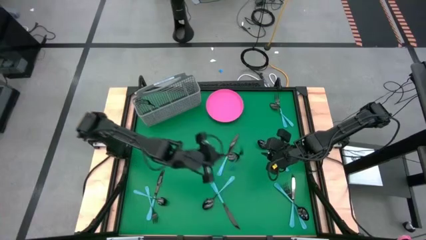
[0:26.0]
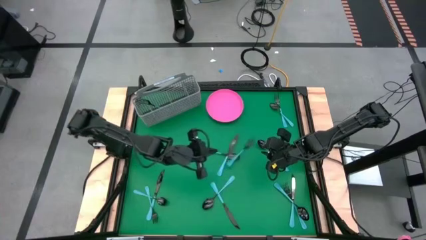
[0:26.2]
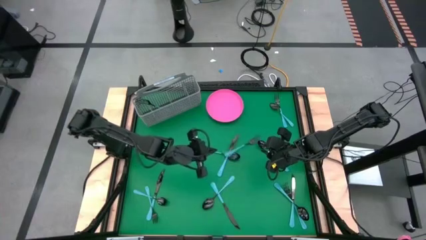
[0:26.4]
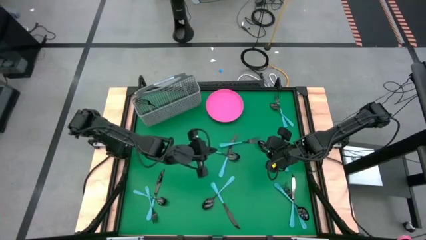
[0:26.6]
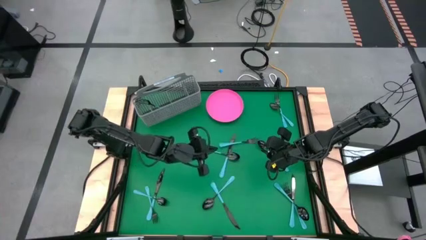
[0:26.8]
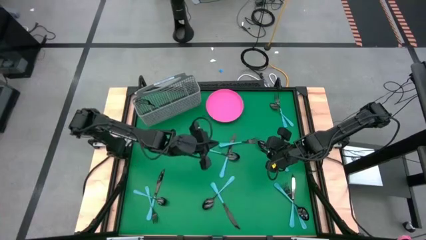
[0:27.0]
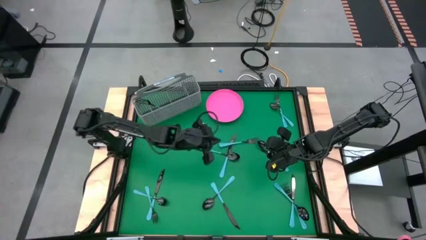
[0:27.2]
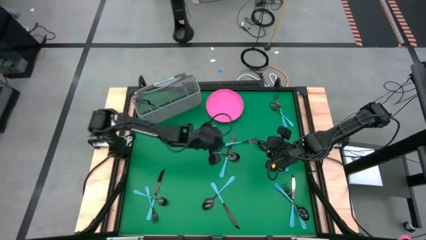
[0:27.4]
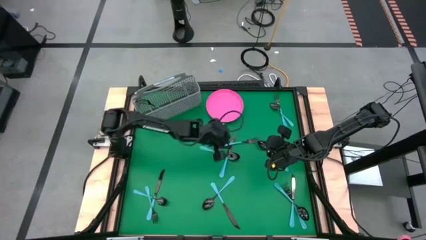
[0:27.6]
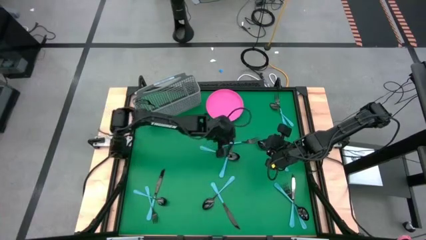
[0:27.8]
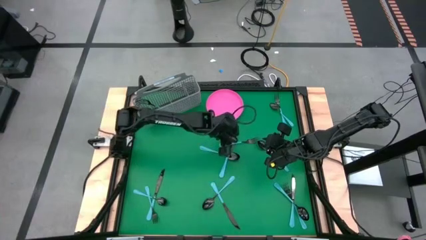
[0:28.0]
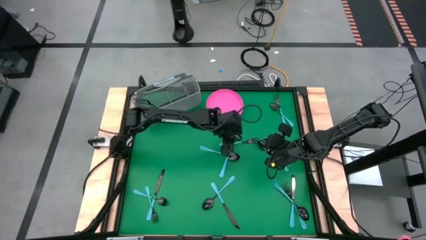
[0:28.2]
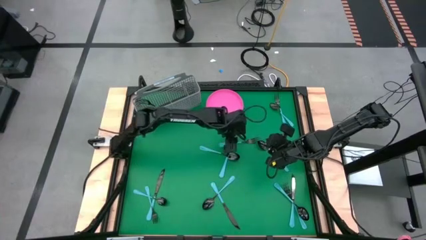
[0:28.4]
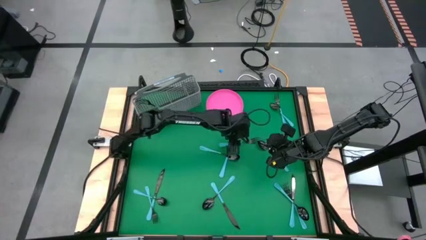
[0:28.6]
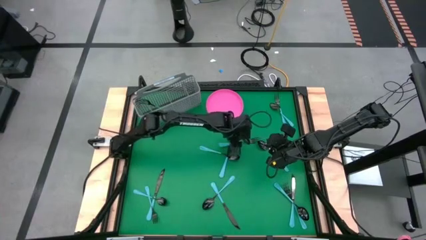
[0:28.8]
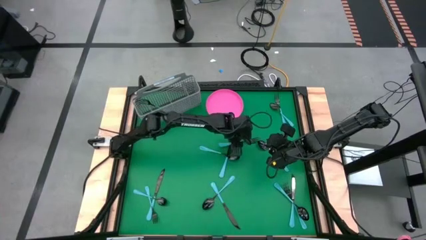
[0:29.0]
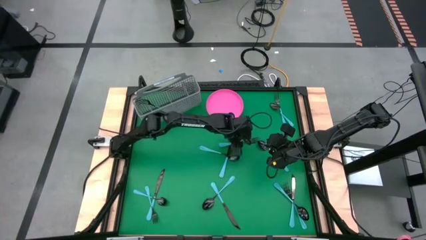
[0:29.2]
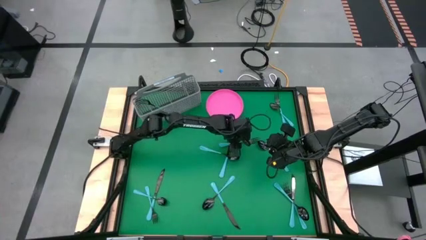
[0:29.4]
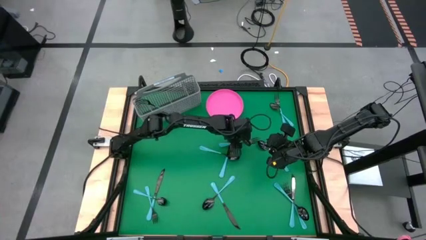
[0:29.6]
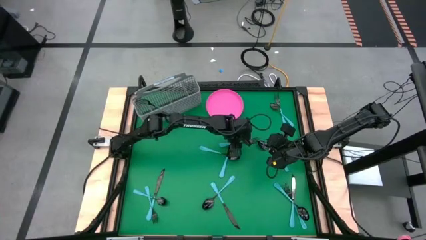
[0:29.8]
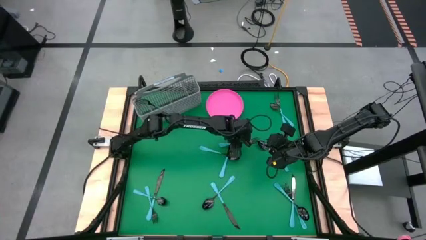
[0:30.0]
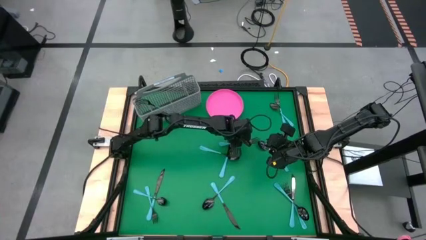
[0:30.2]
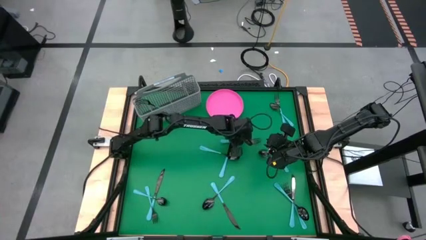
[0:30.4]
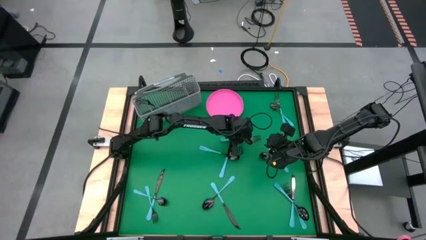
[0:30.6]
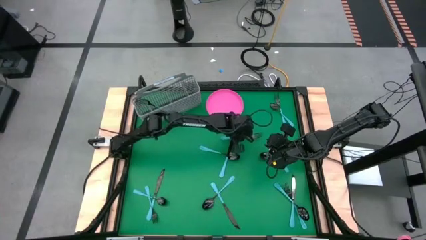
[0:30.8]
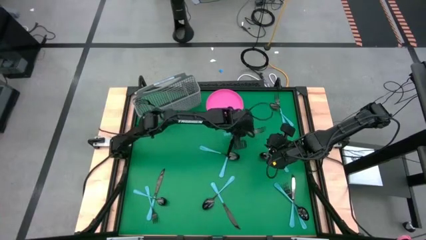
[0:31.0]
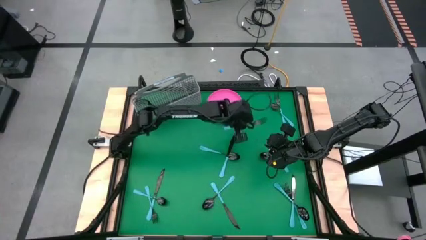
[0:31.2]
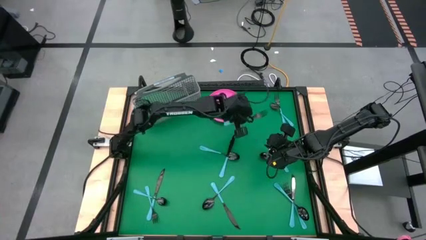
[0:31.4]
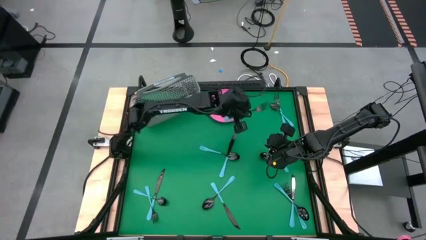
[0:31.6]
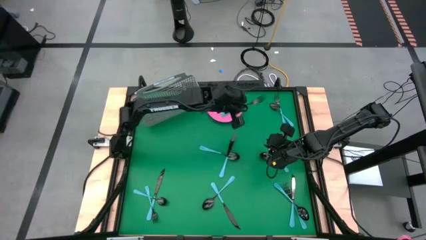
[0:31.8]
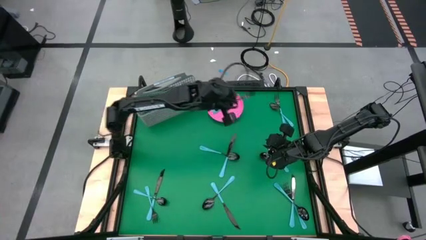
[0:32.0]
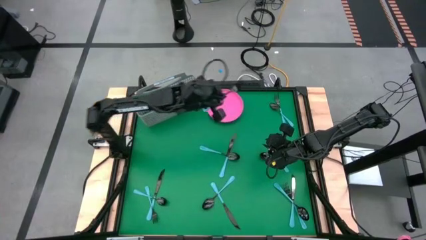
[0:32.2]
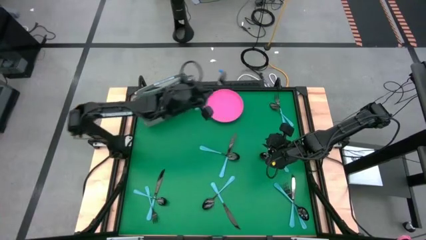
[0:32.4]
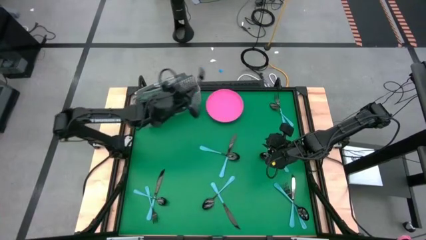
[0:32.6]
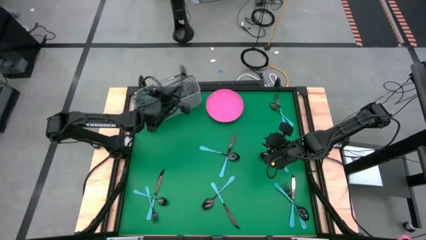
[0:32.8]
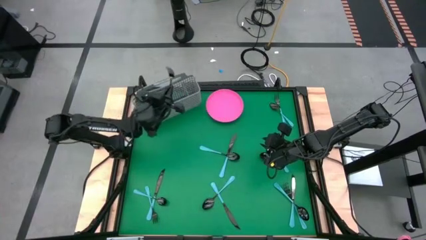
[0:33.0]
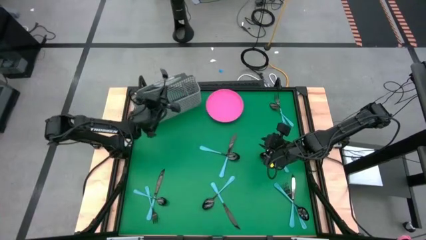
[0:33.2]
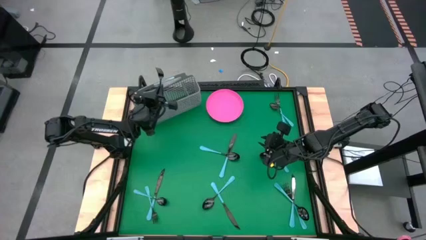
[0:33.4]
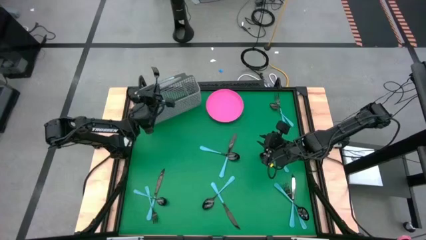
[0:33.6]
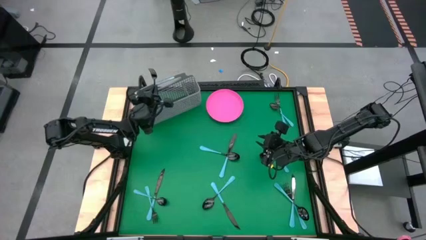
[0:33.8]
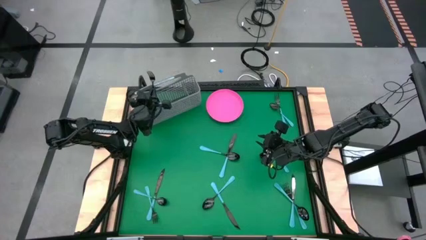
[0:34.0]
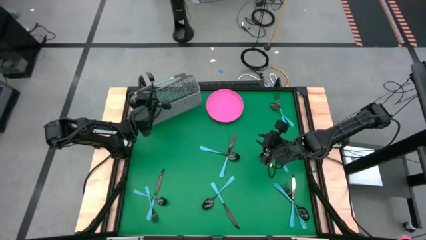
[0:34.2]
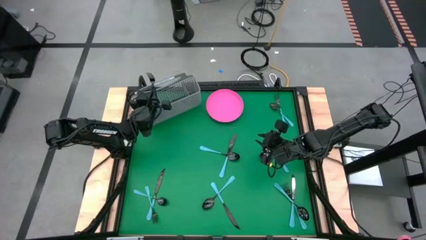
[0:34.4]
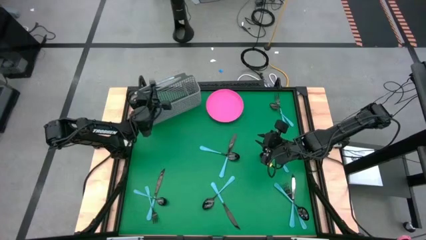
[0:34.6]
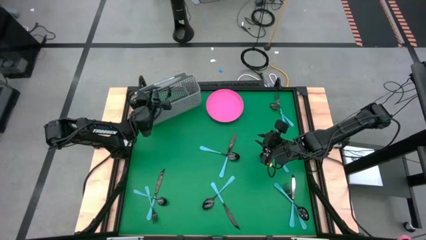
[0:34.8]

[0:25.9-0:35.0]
Task: Sort silverware
Put the blue fork into the gray silverware holder

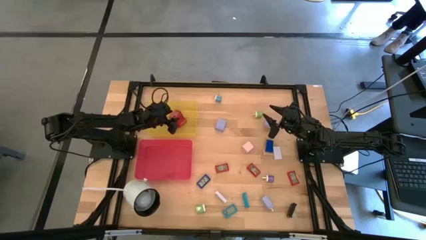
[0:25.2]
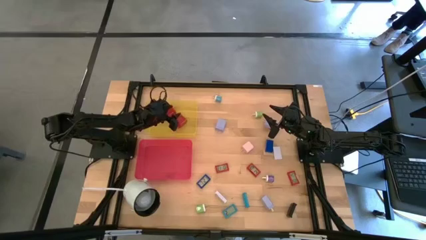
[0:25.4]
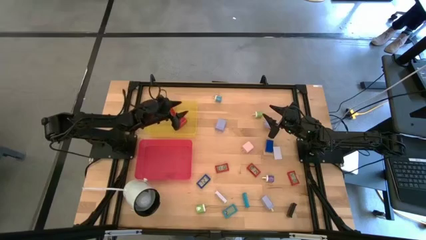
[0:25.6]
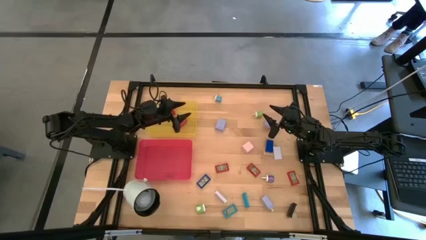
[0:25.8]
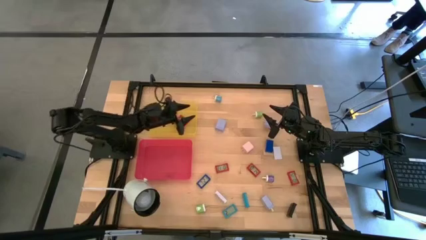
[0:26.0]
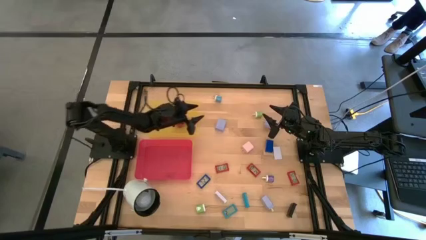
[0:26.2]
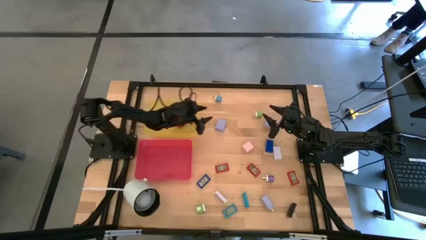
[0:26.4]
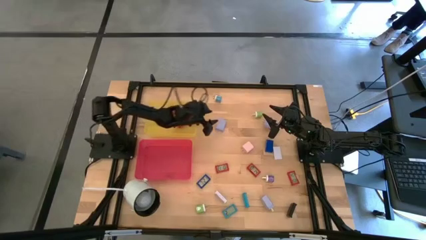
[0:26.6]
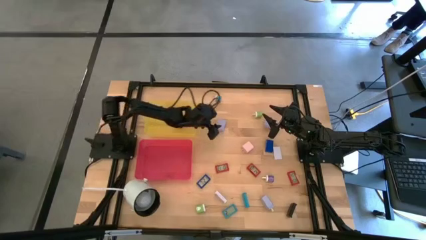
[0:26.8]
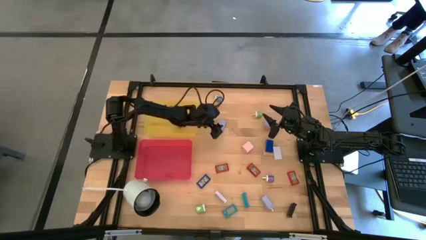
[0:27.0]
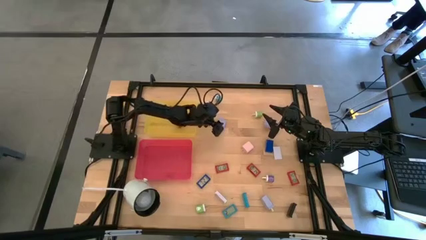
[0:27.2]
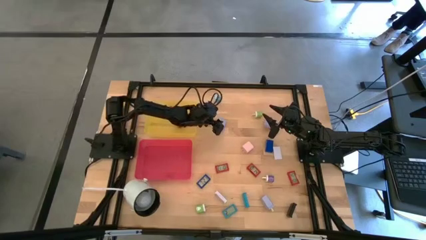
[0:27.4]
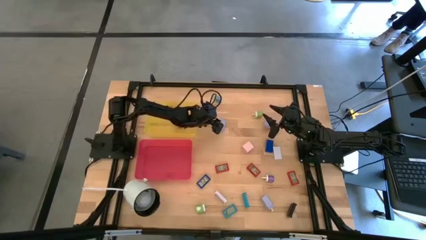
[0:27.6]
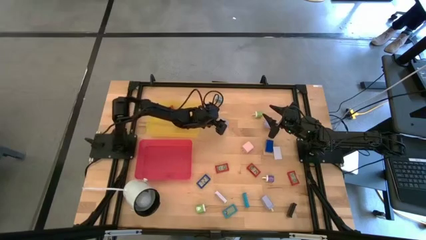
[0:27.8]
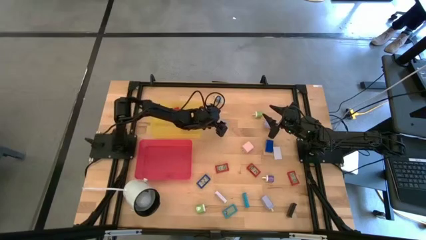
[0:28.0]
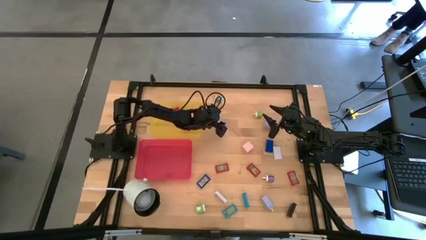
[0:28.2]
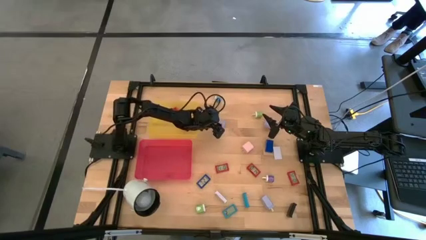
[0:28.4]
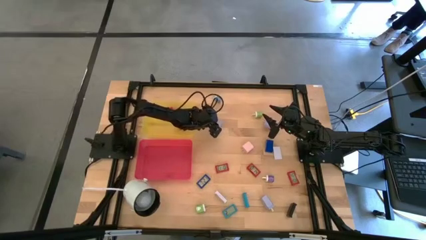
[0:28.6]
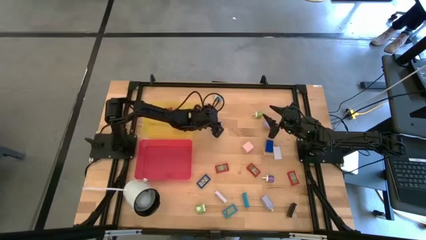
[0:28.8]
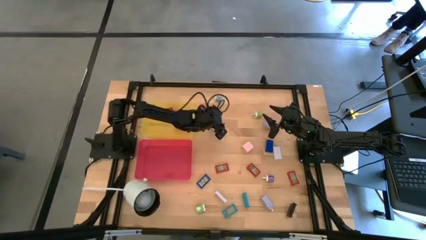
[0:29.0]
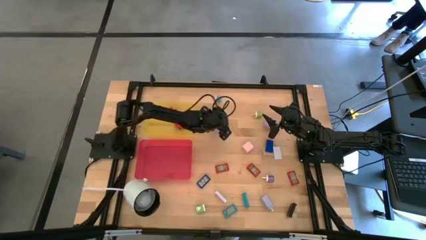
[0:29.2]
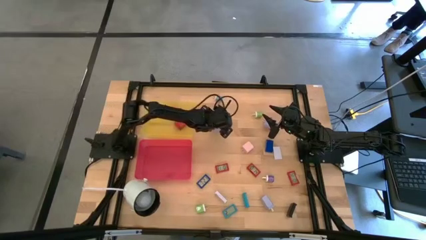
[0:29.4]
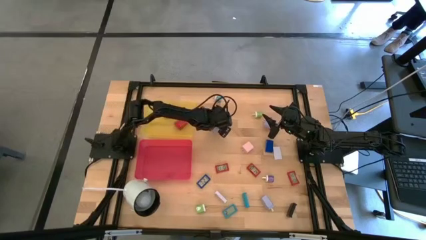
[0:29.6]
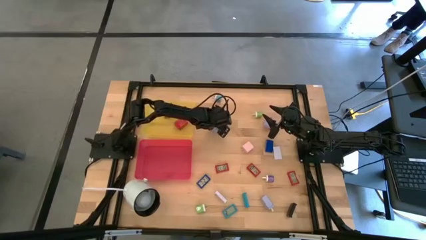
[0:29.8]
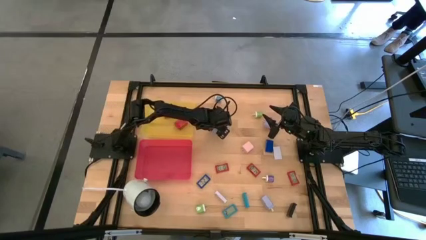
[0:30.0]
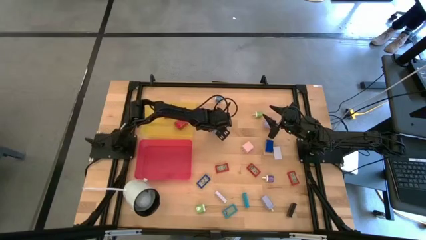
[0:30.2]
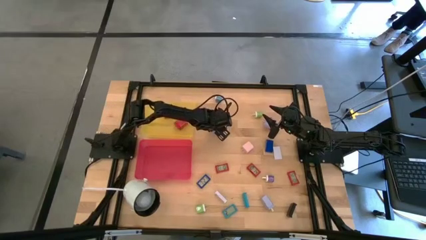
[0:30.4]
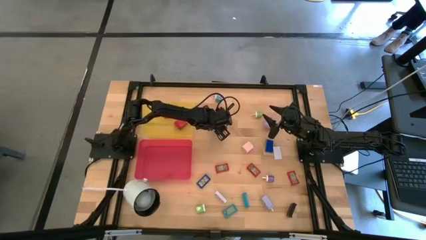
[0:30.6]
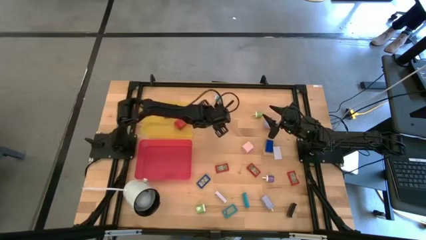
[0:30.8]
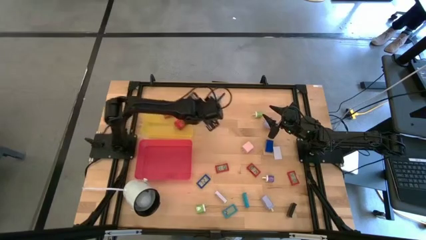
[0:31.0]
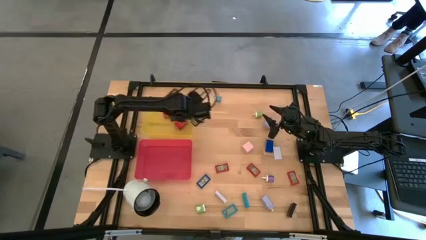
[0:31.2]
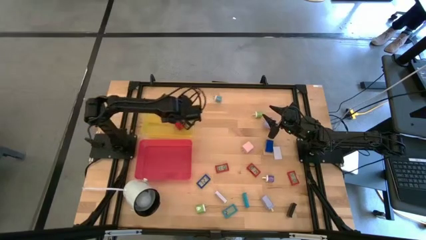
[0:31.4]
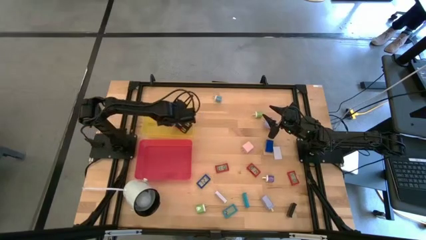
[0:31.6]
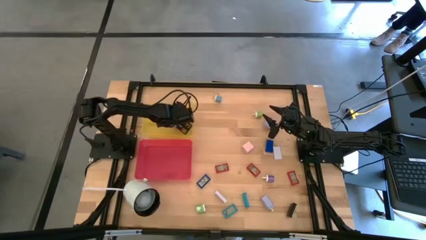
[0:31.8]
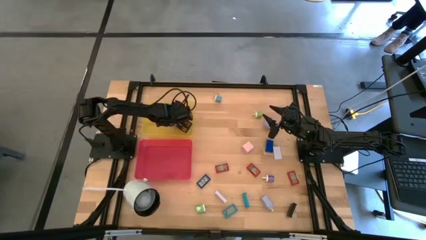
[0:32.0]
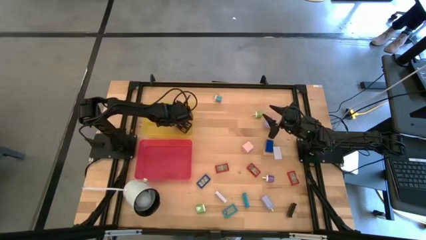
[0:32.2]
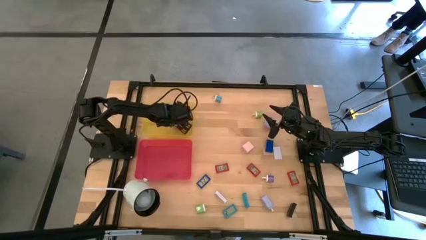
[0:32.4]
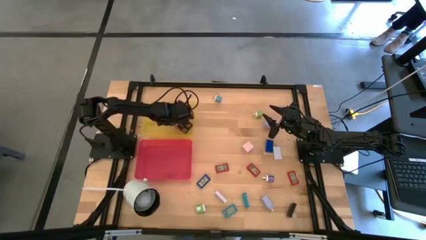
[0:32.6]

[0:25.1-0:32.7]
Task: Pick & Place Office items
Put the blue charger adapter into the yellow bin
